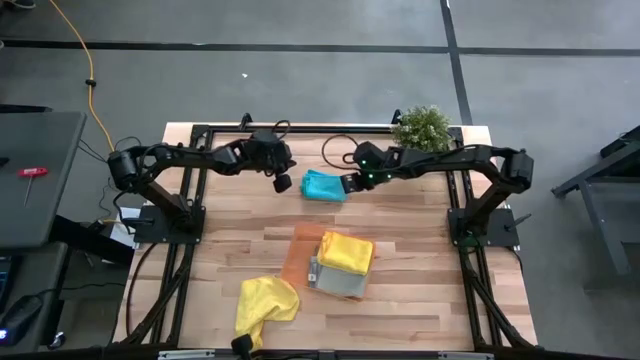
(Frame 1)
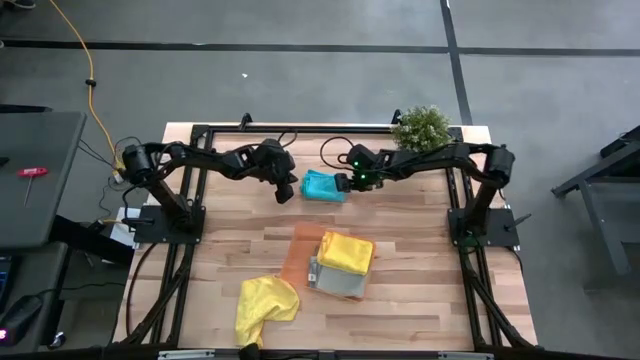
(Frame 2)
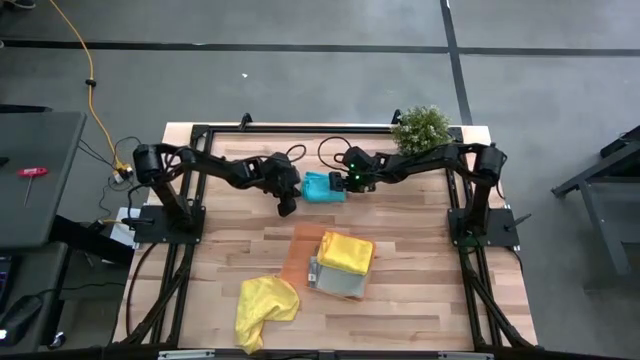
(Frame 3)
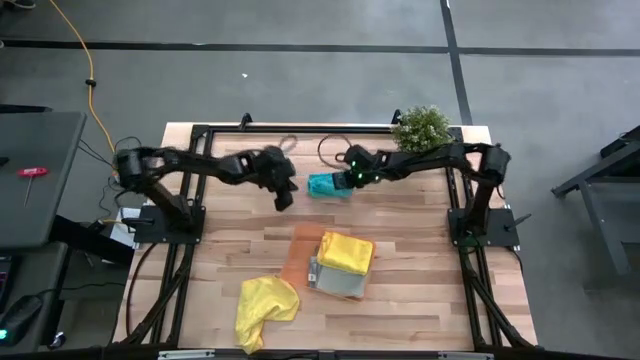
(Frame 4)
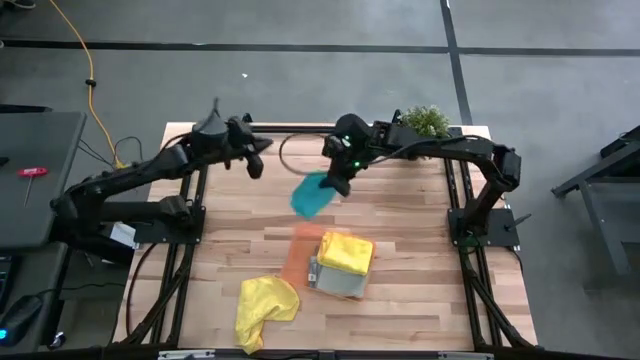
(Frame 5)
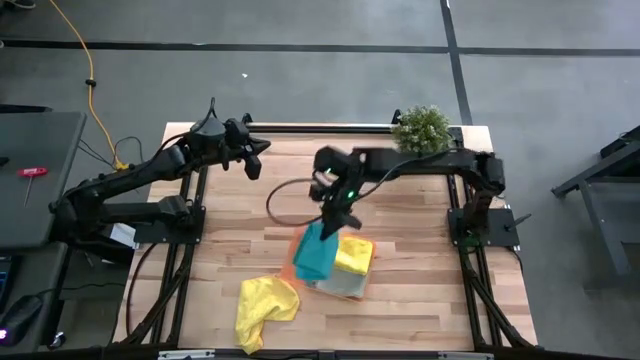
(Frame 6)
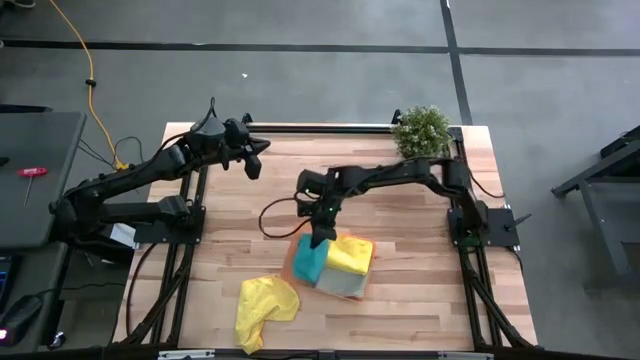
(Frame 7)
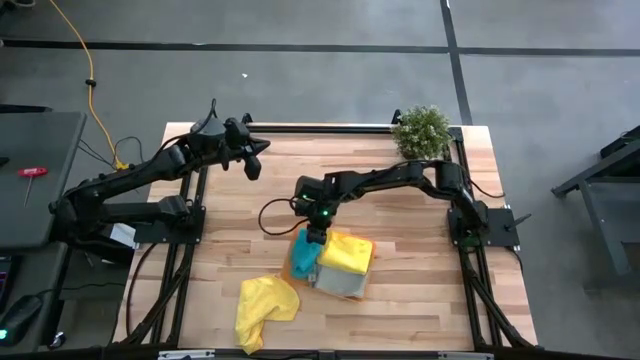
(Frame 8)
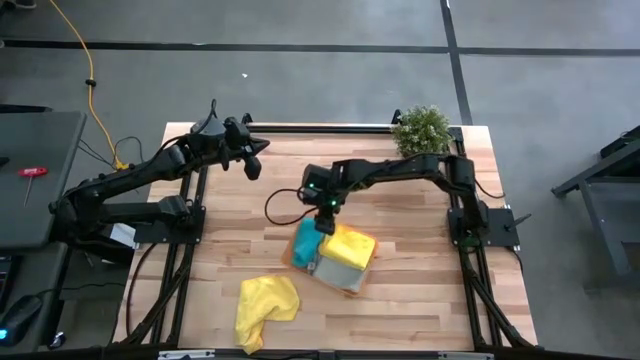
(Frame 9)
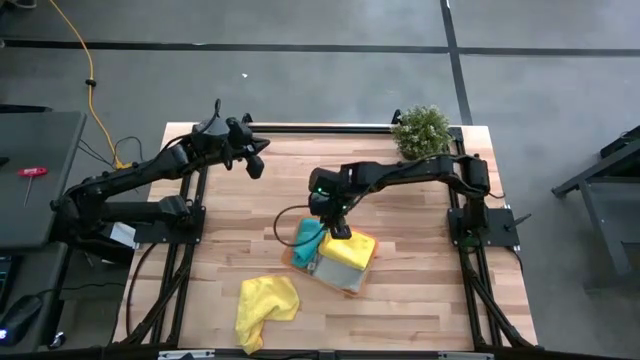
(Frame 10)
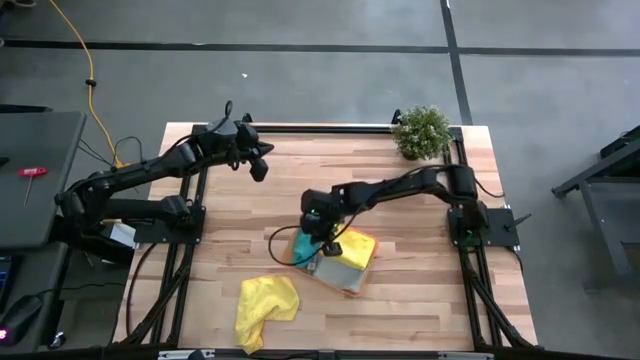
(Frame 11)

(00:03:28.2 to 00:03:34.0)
Task: Fold microfiber towels
Put the blue towel into the bin

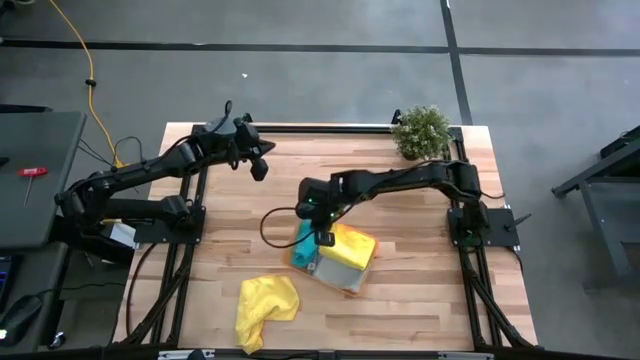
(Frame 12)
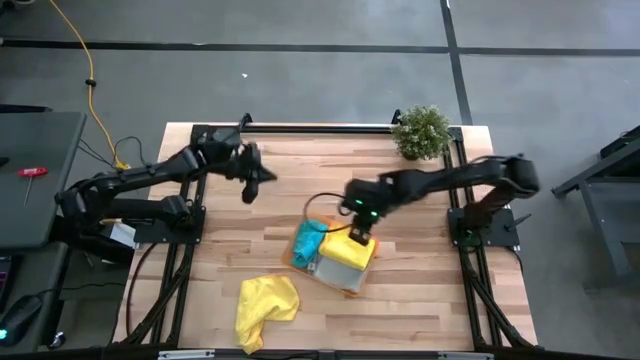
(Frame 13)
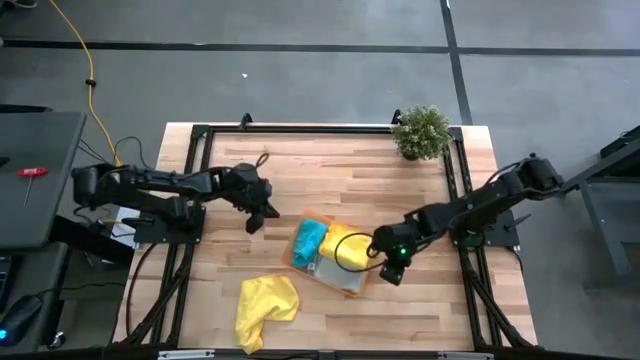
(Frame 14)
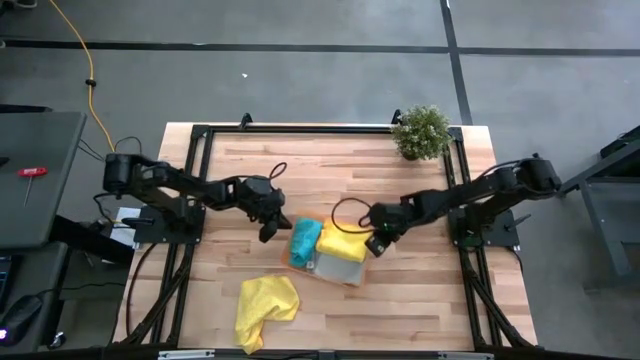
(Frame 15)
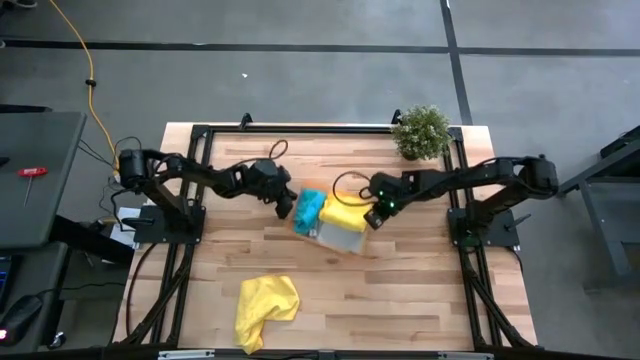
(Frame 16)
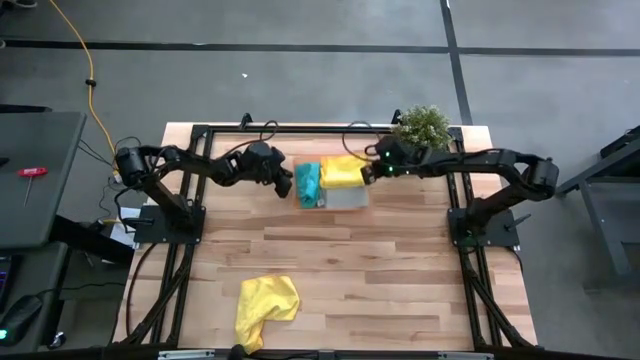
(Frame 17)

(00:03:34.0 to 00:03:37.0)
Move the bin to the top of the table

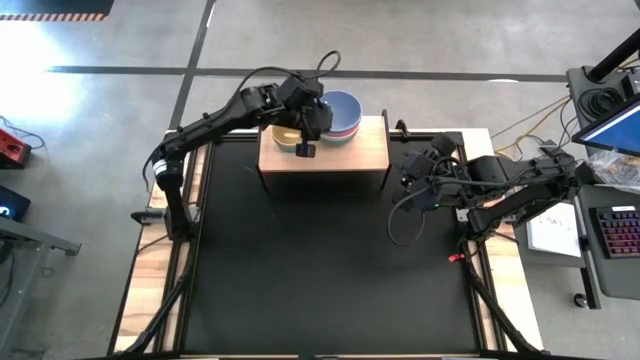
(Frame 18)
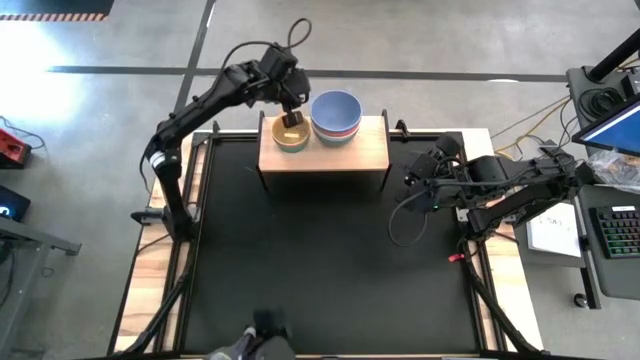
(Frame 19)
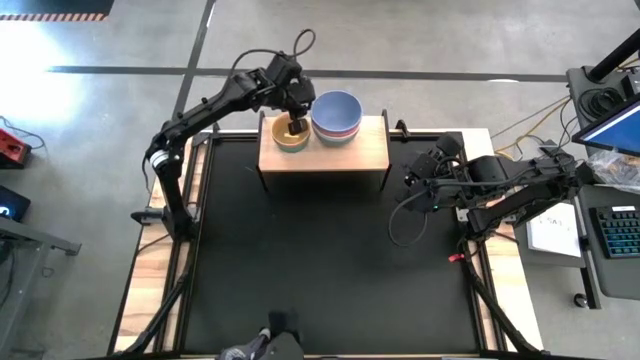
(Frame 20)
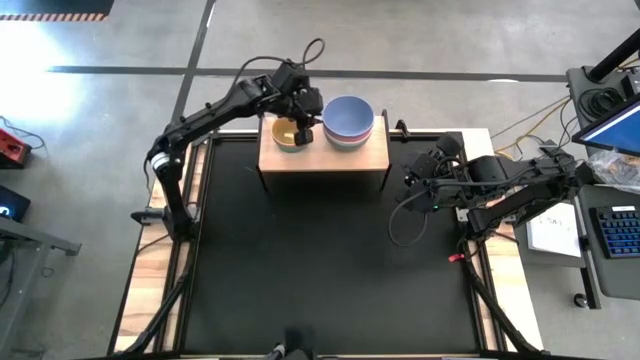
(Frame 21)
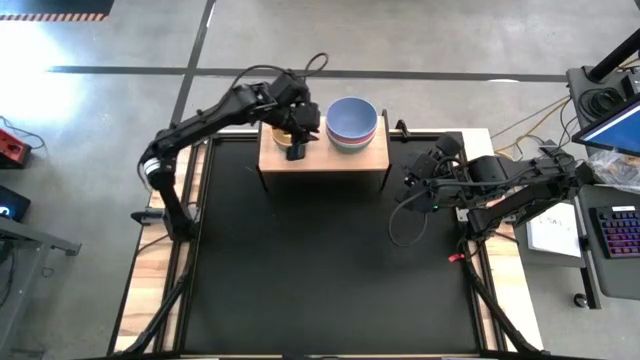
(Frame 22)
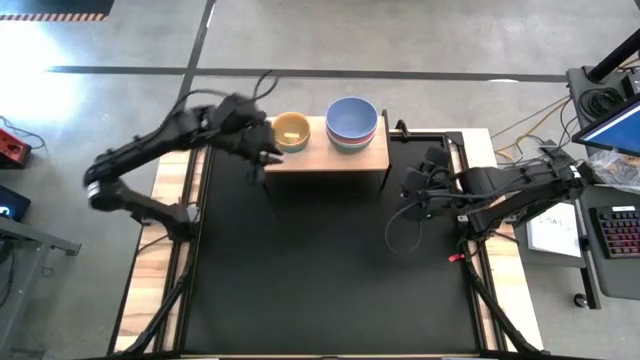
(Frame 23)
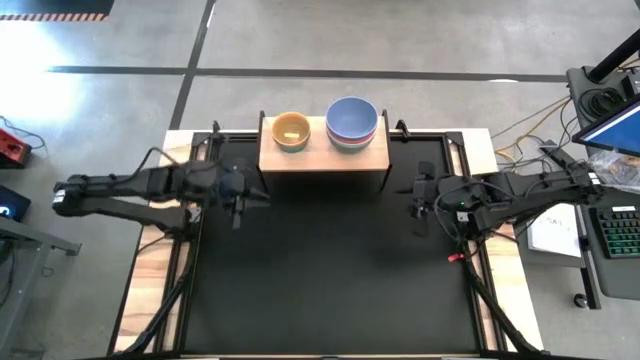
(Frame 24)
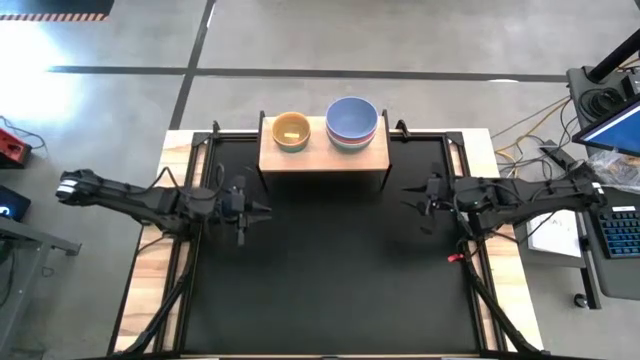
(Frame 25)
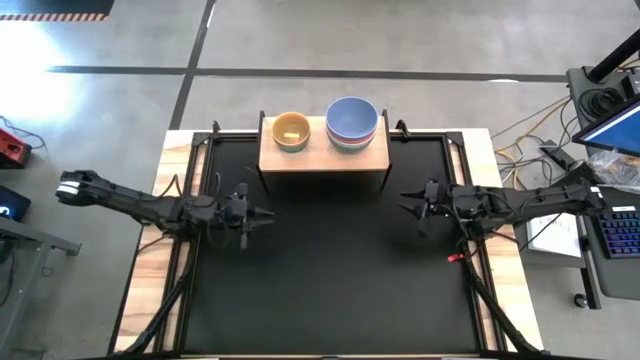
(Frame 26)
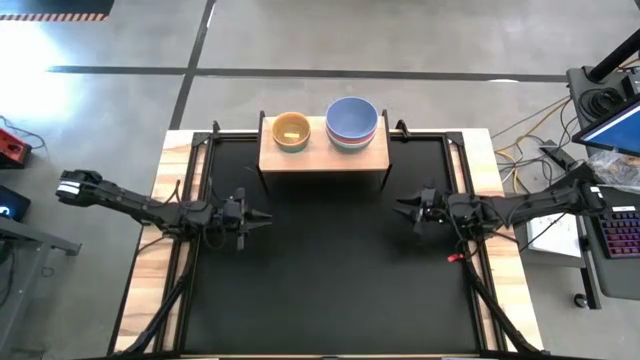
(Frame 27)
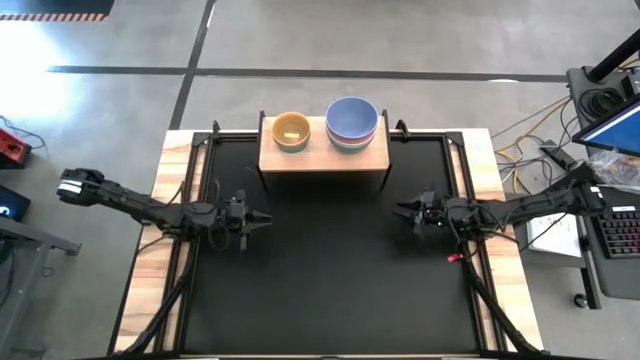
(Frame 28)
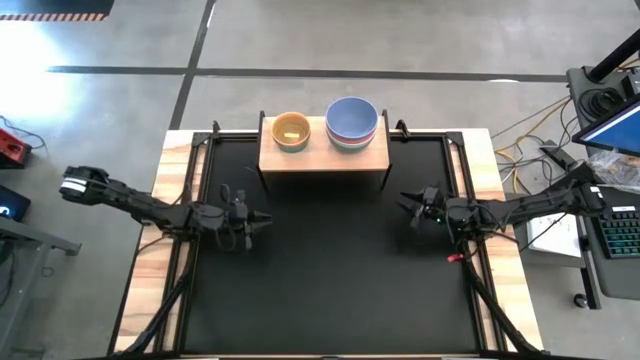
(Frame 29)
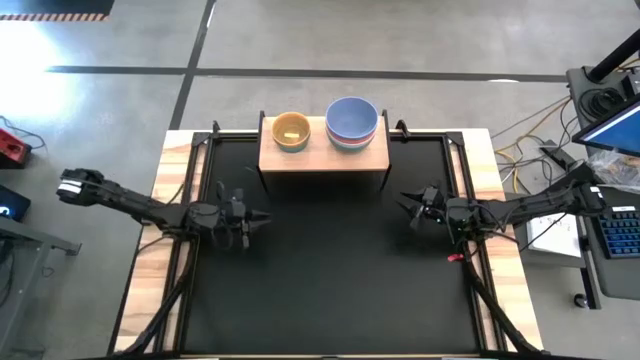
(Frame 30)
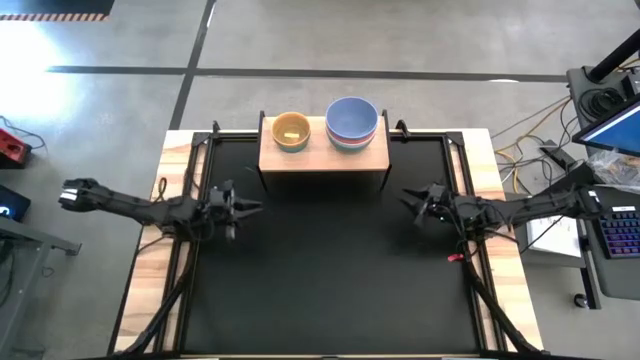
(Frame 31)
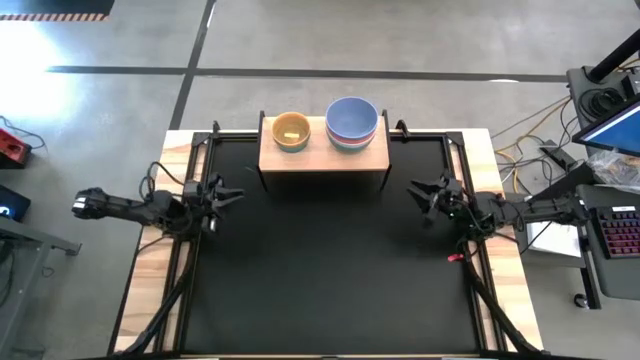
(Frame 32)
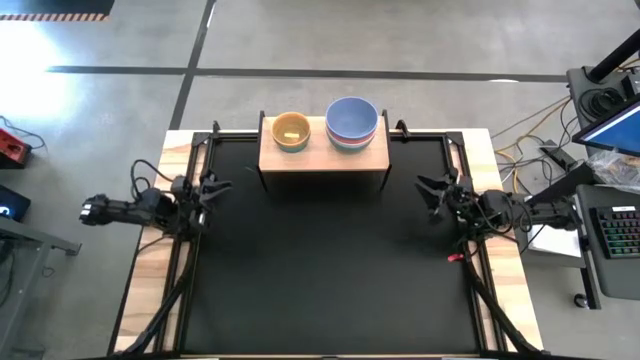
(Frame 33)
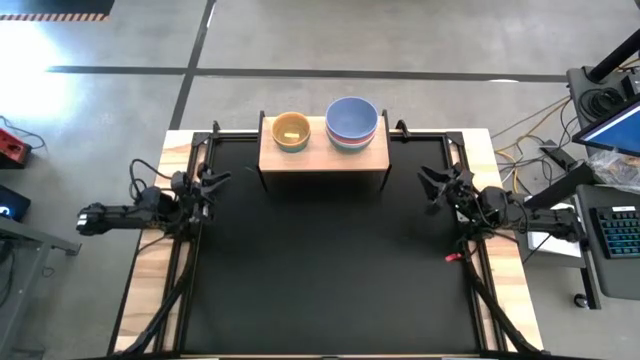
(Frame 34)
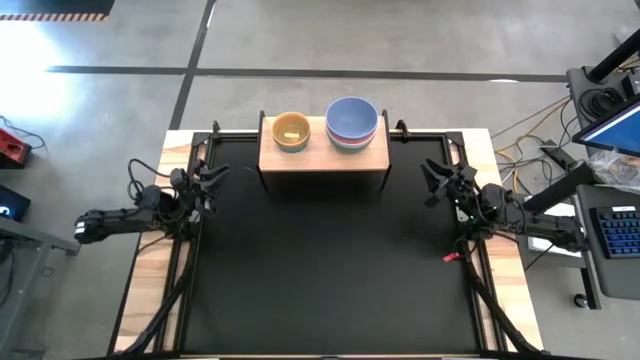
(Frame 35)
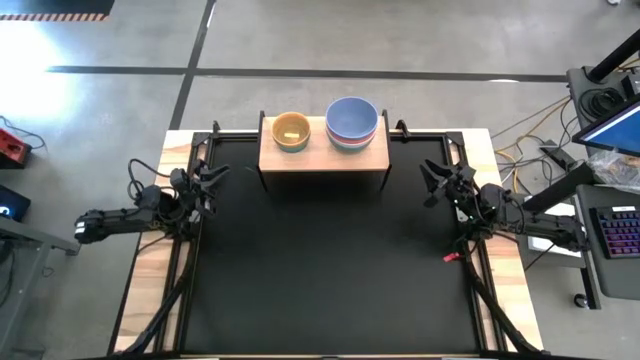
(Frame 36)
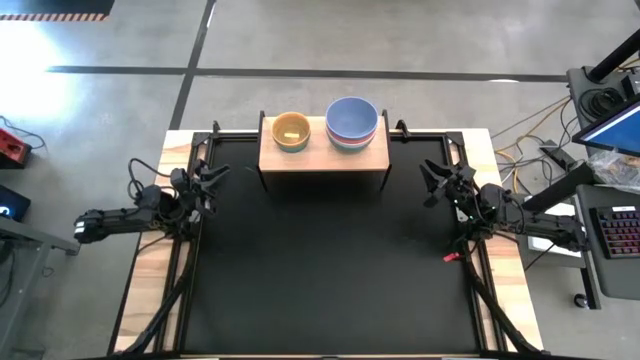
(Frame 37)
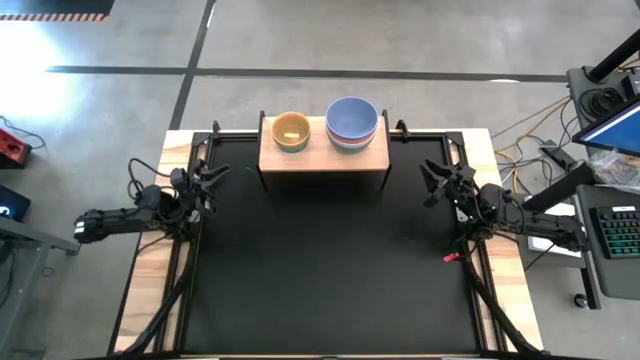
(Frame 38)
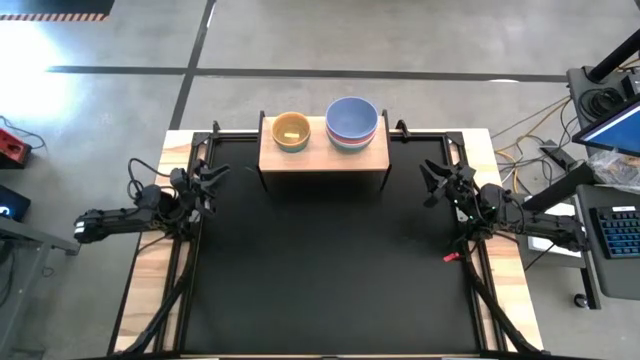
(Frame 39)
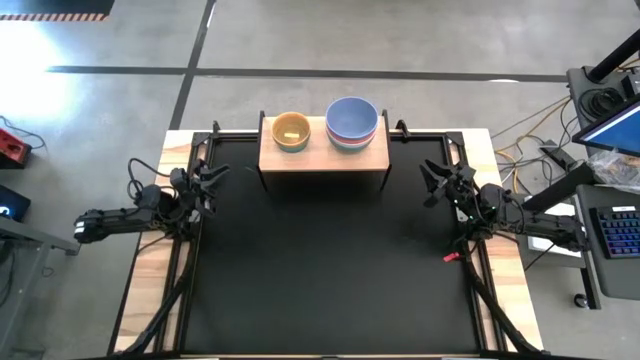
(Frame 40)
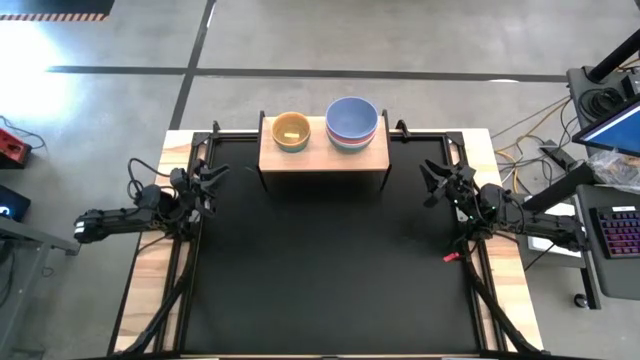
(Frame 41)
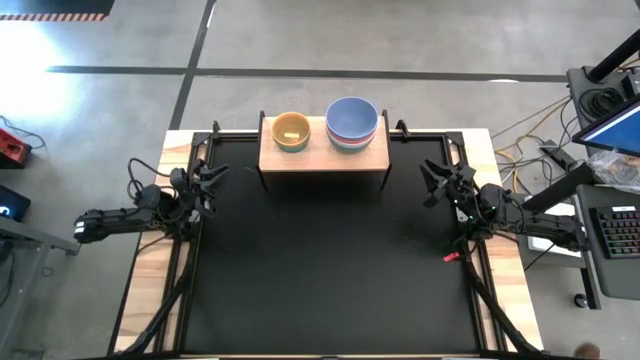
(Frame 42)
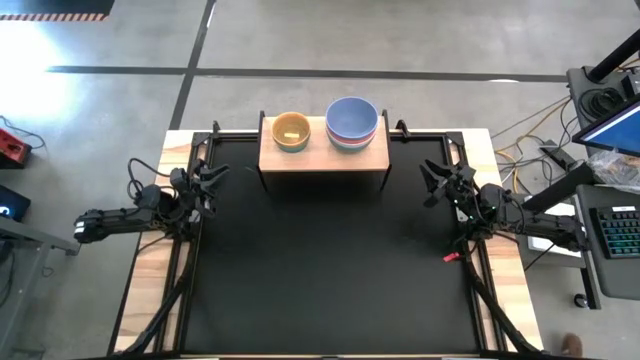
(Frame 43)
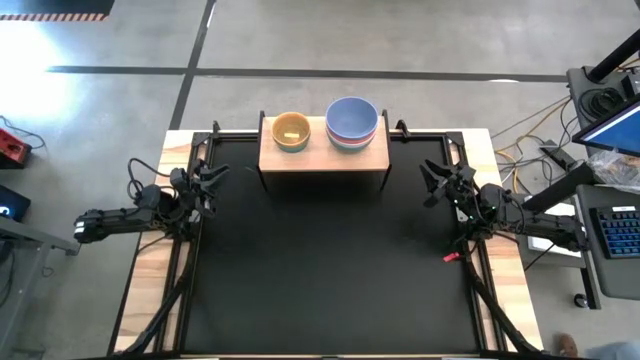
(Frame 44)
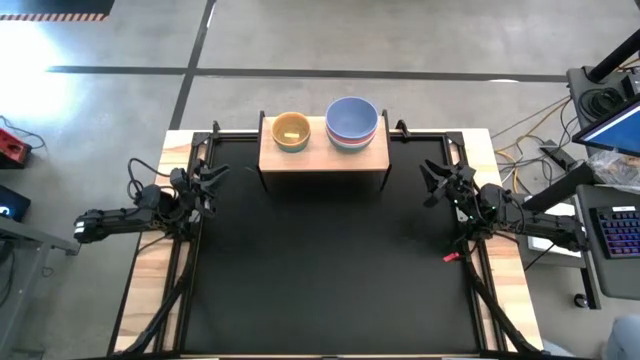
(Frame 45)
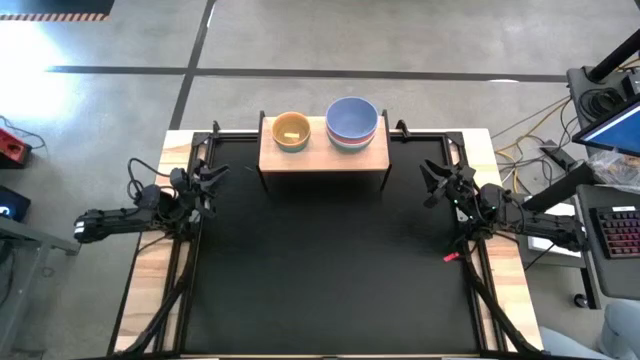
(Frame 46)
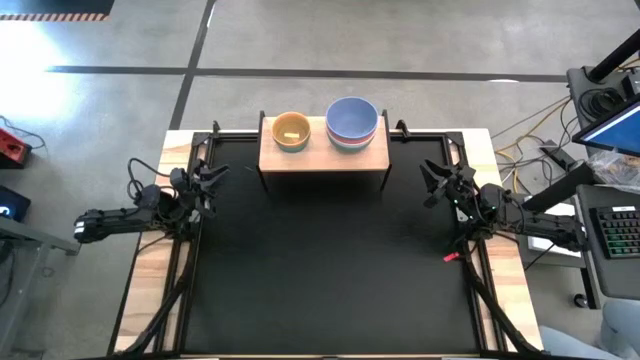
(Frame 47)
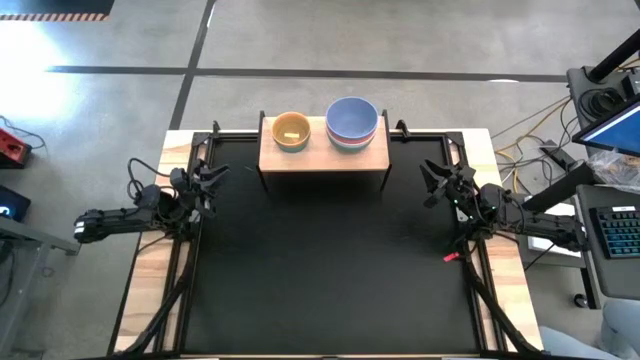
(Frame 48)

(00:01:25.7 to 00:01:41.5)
Task: Place and stack bowls onto a shelf
Return to Home Position
